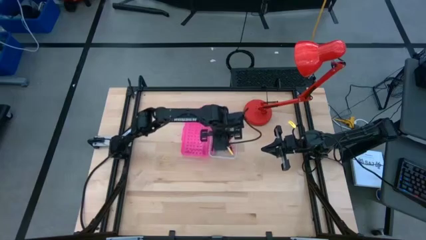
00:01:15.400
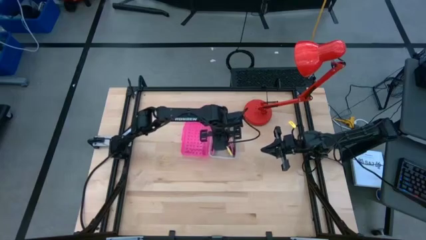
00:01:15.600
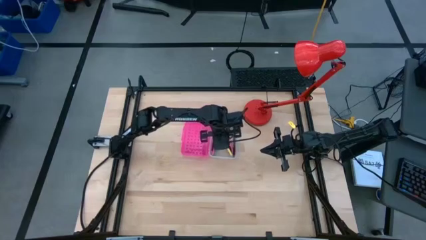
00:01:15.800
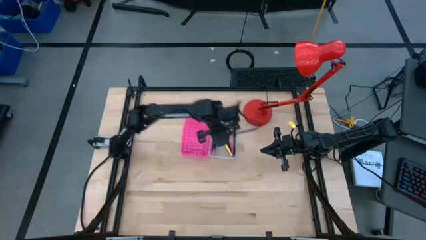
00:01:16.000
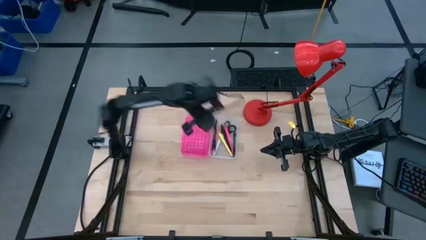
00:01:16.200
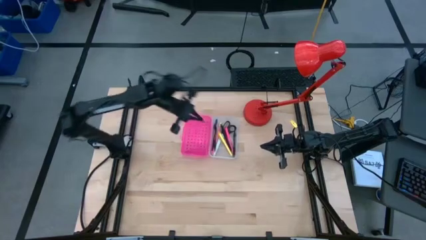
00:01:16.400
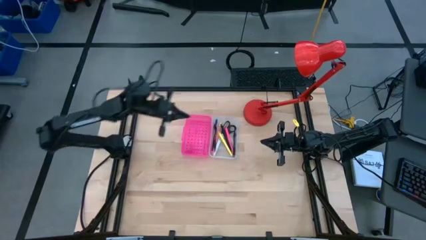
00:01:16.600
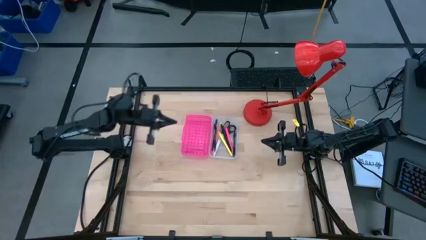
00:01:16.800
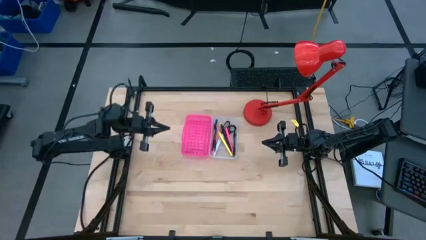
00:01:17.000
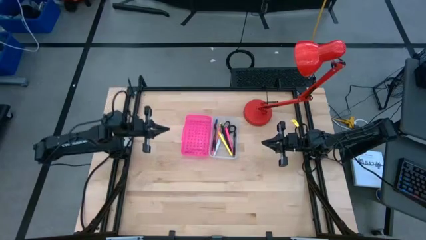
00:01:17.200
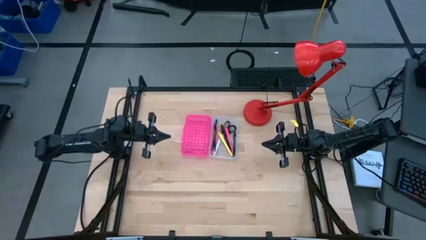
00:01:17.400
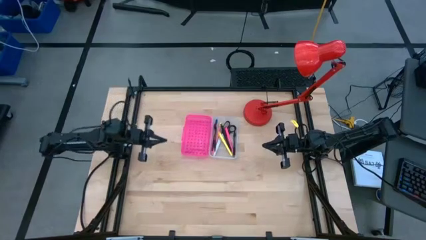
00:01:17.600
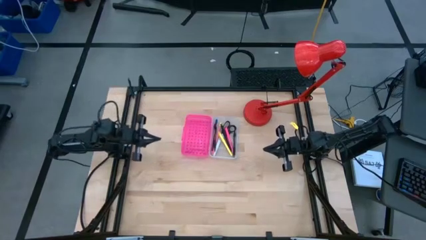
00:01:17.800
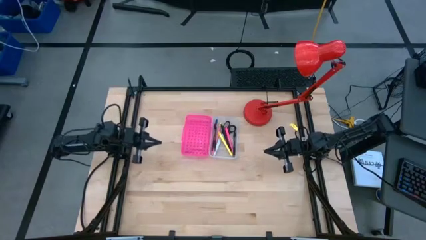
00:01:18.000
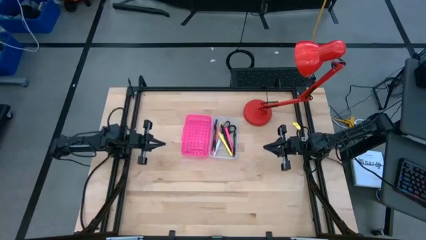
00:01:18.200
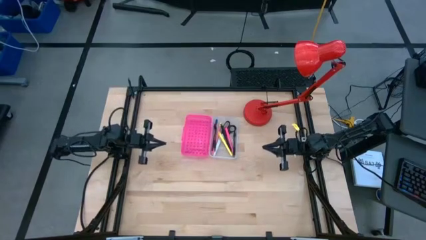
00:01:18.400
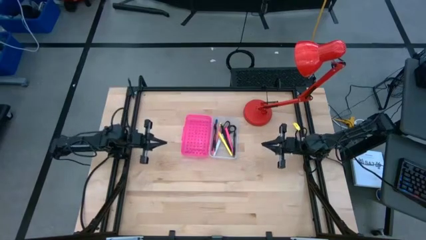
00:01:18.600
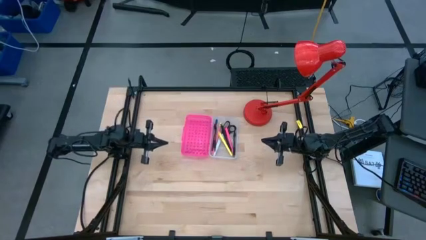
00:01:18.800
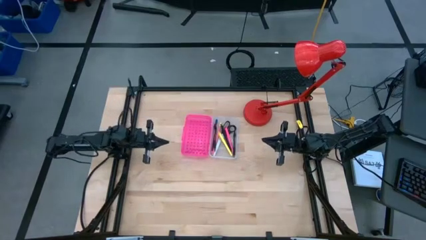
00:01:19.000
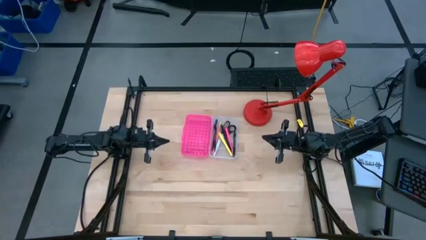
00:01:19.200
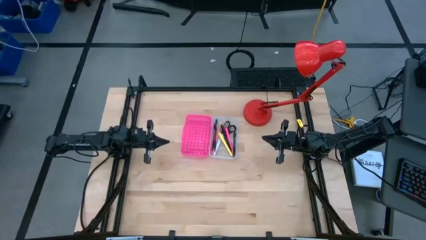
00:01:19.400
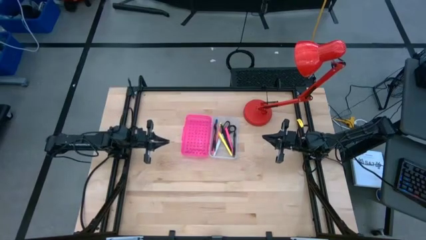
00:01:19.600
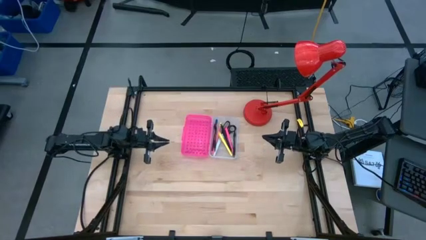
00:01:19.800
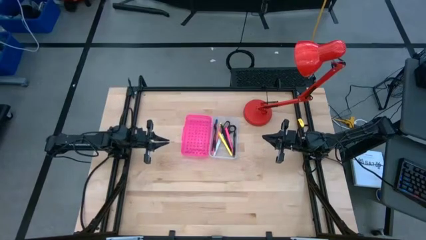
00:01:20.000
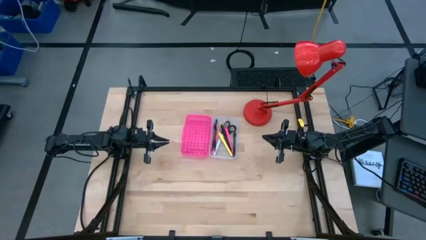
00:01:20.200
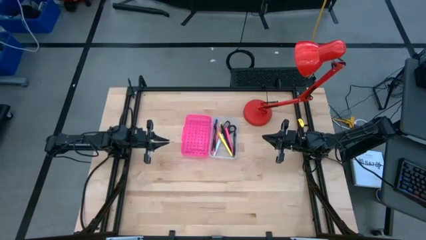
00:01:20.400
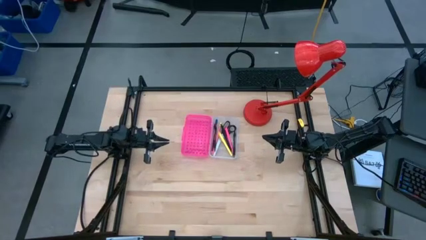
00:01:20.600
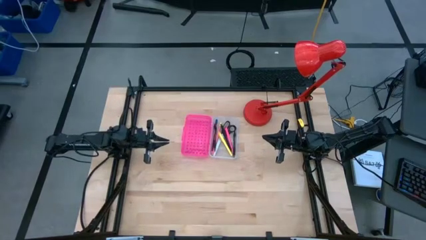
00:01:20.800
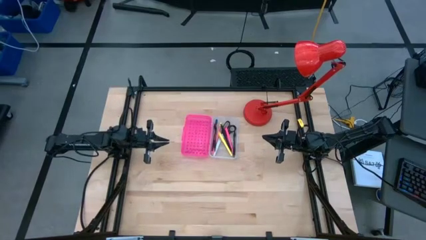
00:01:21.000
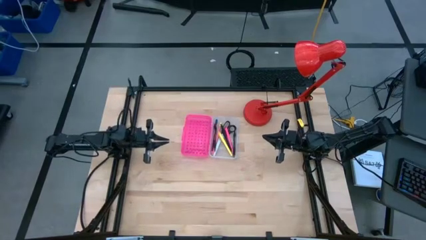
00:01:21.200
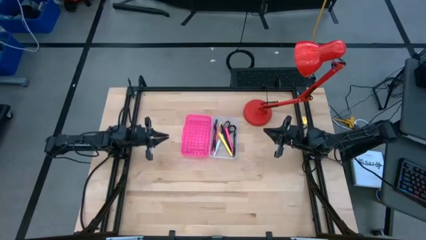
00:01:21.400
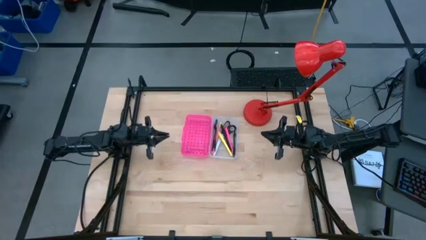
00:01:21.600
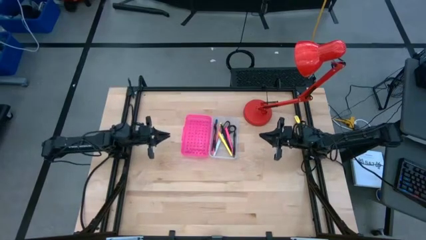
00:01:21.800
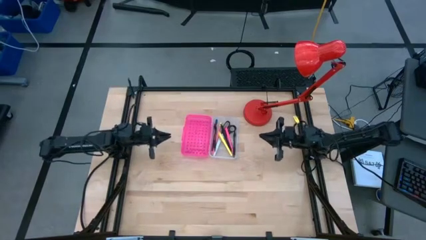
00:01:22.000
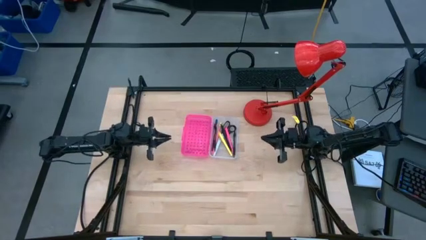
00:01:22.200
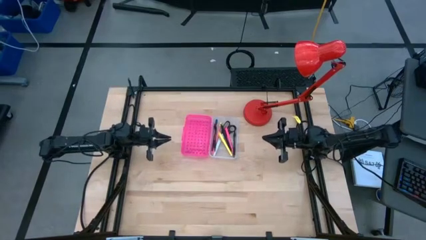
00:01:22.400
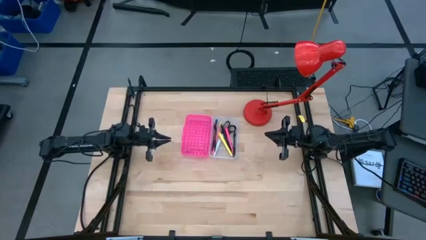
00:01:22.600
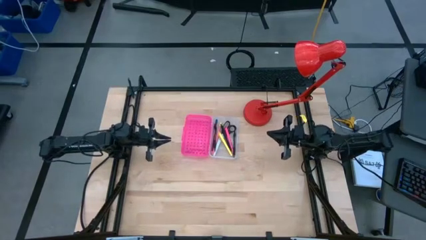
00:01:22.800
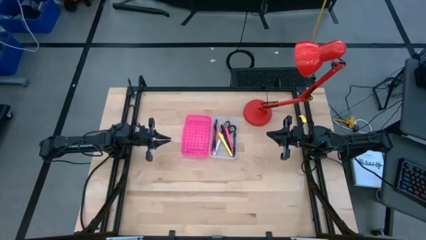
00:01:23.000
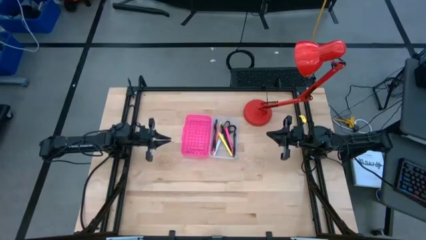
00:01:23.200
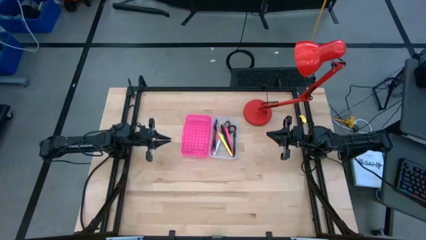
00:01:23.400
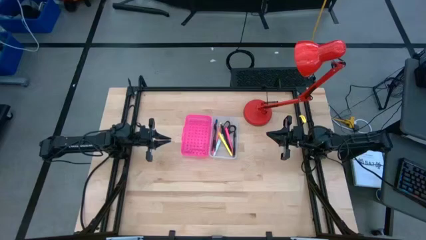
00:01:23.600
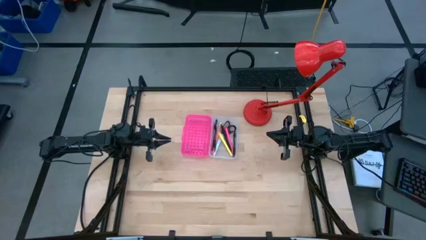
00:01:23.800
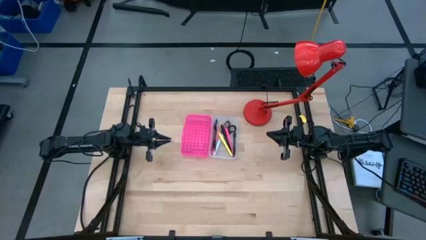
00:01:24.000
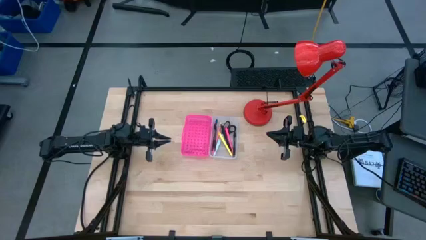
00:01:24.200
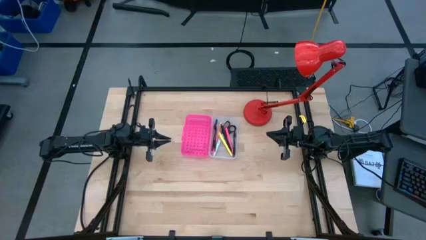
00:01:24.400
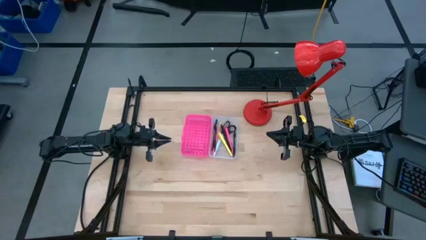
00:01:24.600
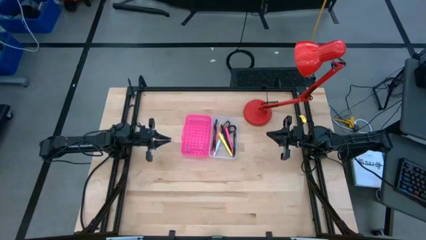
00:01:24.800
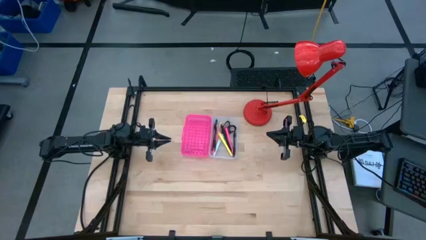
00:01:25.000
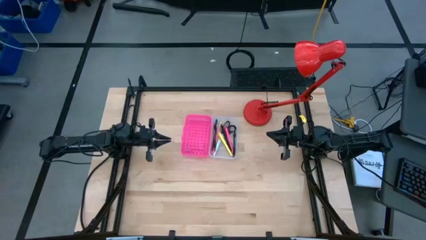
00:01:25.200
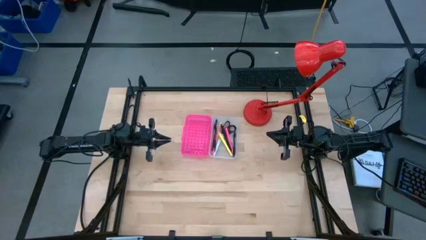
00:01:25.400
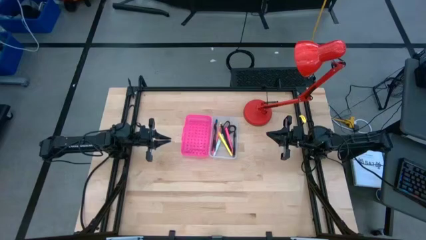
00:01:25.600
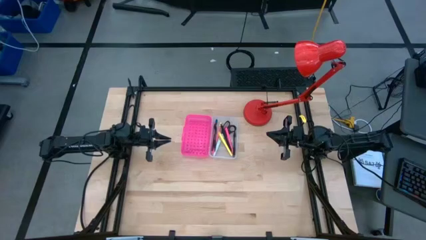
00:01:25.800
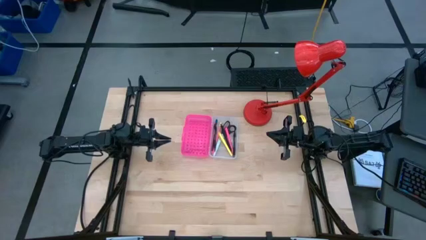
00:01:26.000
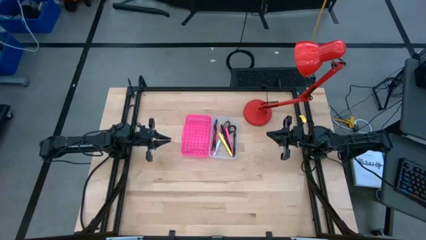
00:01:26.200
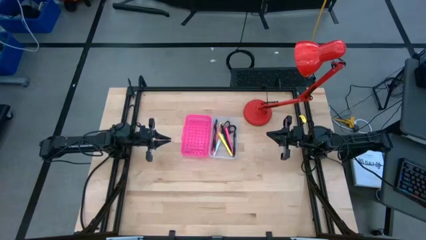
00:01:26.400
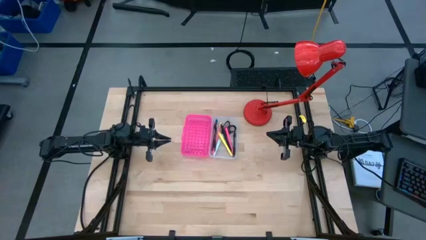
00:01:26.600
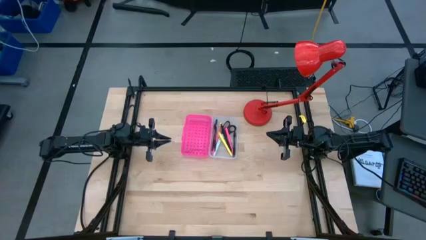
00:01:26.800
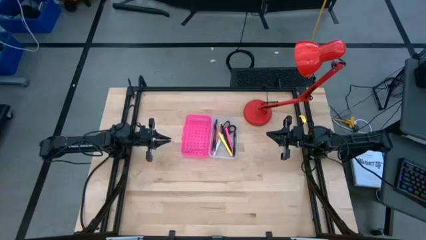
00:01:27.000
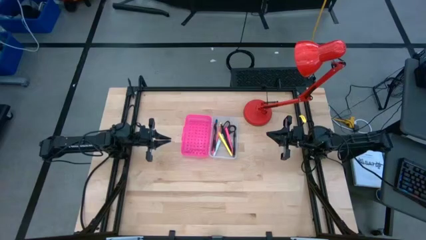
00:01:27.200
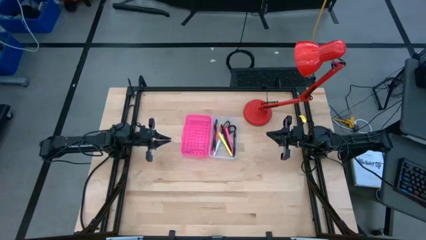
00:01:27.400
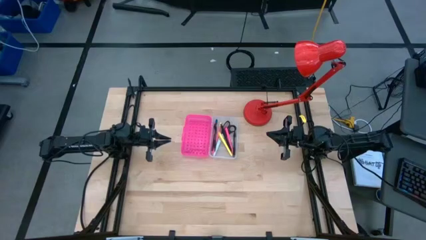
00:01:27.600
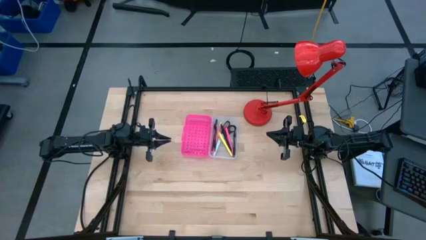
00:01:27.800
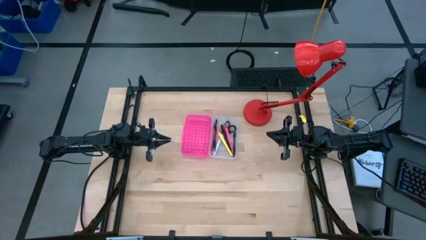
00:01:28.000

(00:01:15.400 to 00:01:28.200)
Task: Pick & place school supplies into a supply box
Return to Home Position

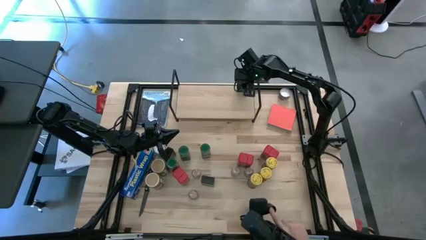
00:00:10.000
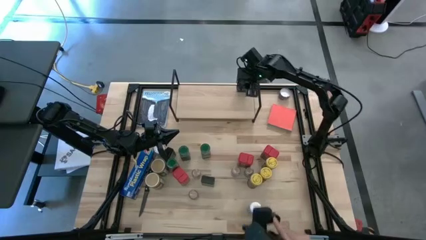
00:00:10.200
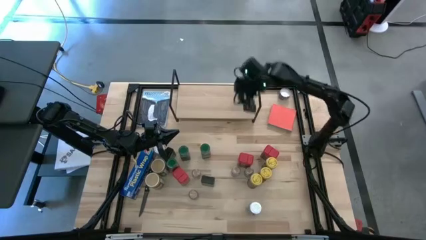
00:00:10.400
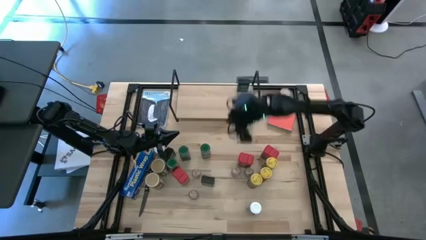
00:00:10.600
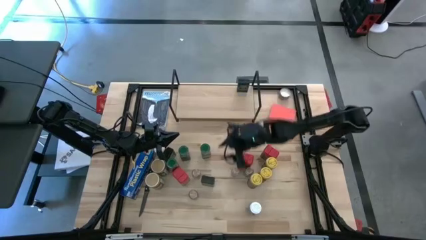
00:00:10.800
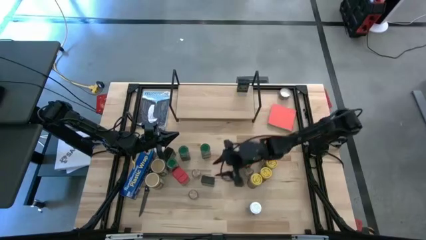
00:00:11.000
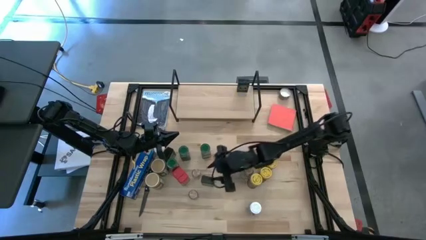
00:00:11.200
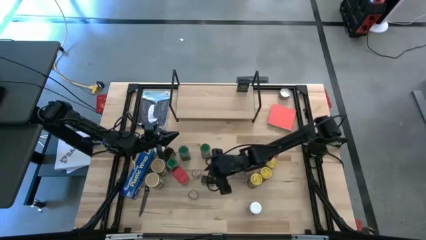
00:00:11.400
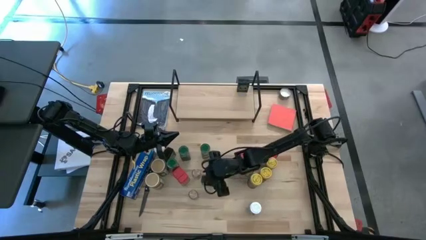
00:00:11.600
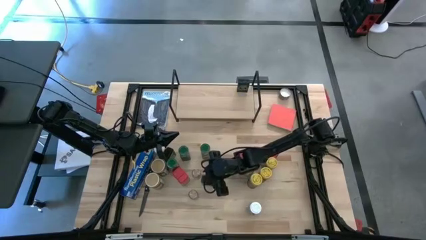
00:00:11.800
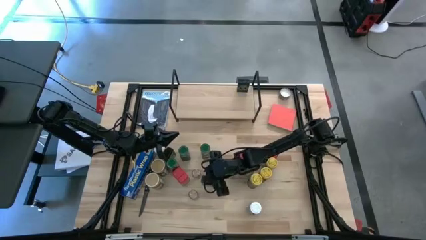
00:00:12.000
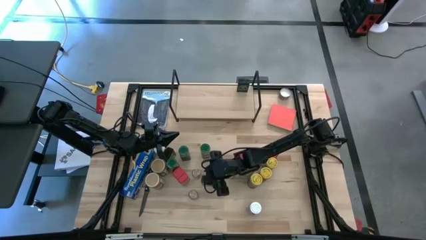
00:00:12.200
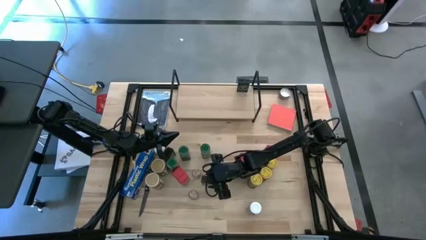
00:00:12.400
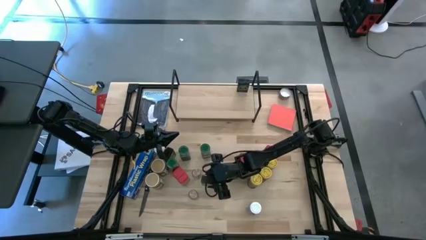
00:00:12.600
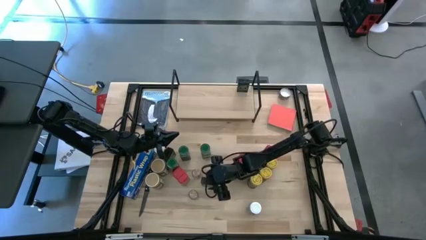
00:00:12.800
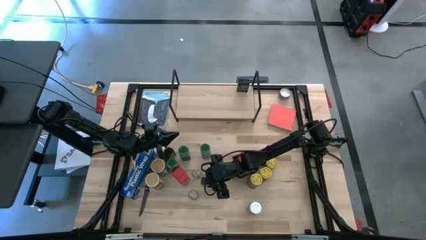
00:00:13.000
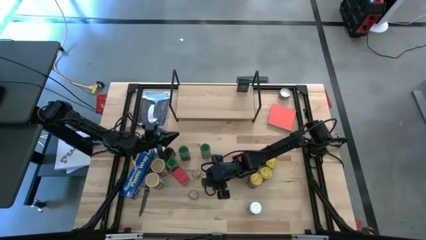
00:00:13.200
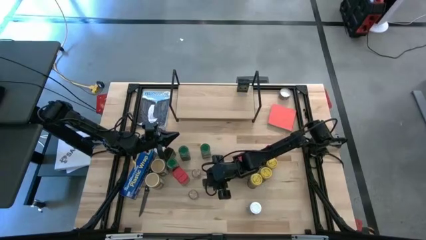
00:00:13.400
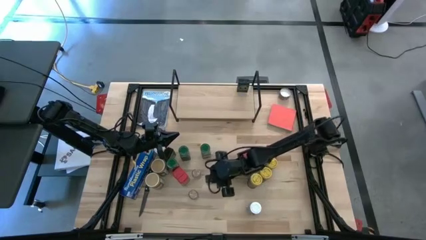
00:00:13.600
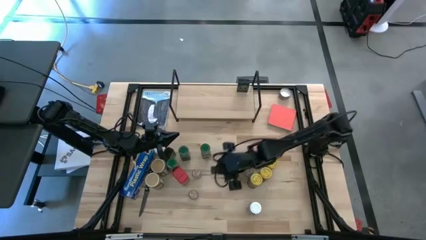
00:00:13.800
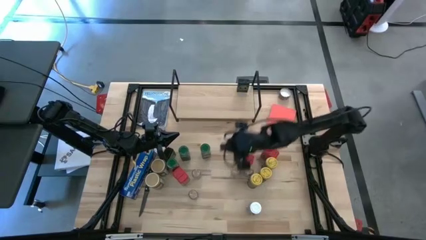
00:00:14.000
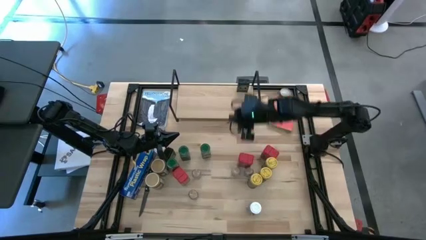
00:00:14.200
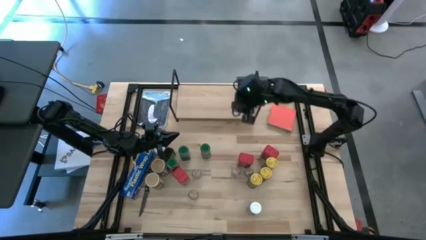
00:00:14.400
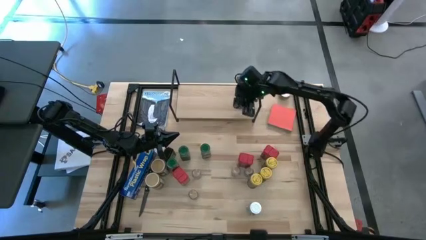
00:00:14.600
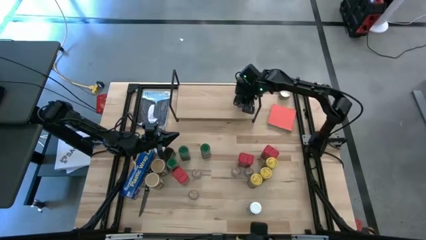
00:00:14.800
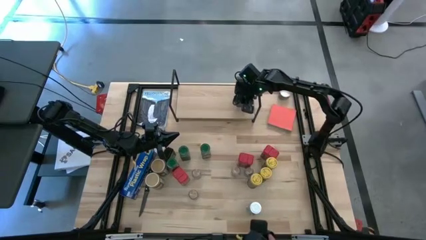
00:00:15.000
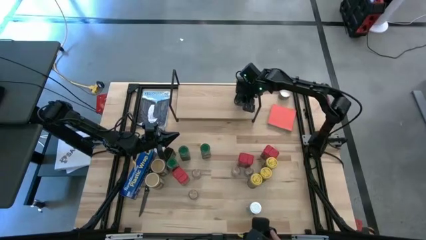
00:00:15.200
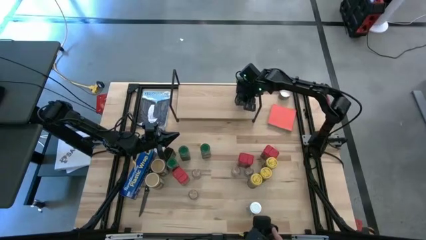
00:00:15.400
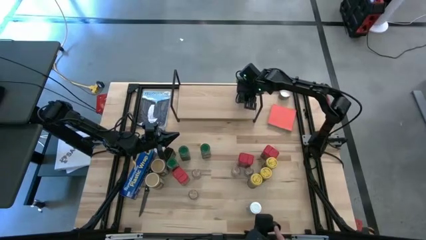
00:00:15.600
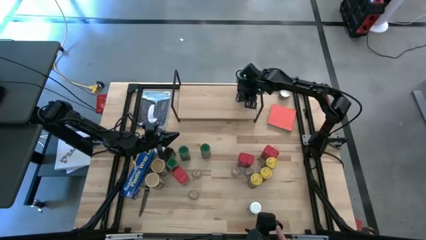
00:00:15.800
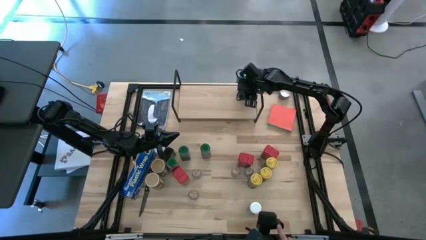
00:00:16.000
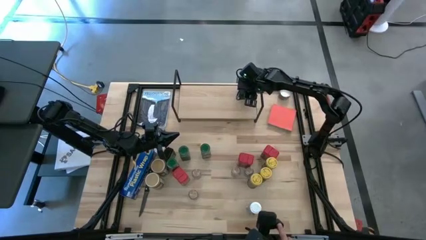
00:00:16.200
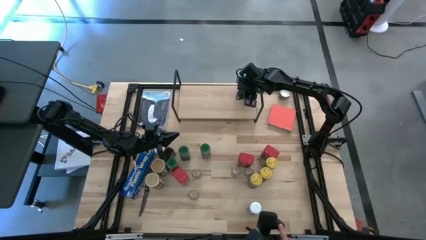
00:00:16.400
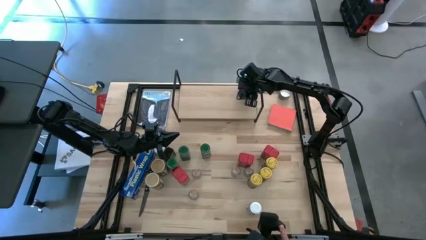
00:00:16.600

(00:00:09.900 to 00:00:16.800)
Task: Shelf spices
Put the seasoning can on the shelf aligned with the black seasoning can
